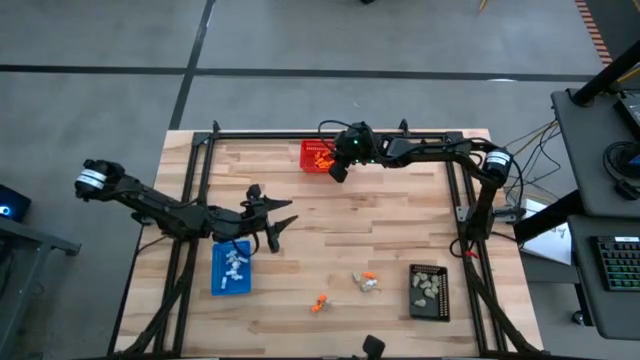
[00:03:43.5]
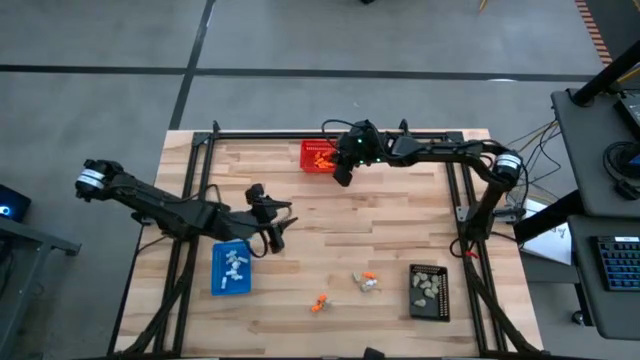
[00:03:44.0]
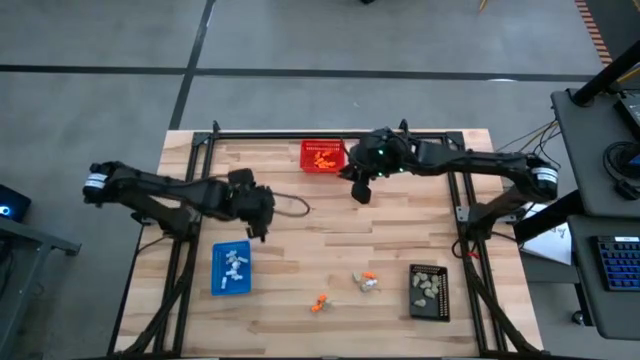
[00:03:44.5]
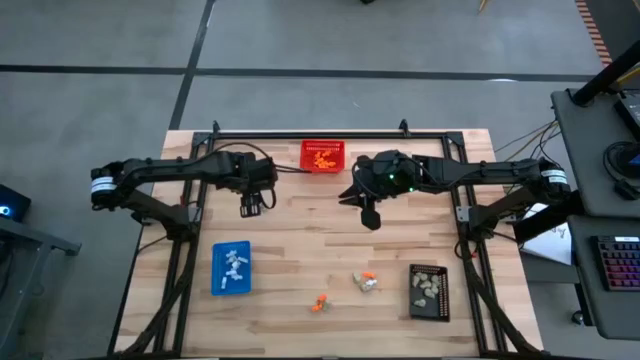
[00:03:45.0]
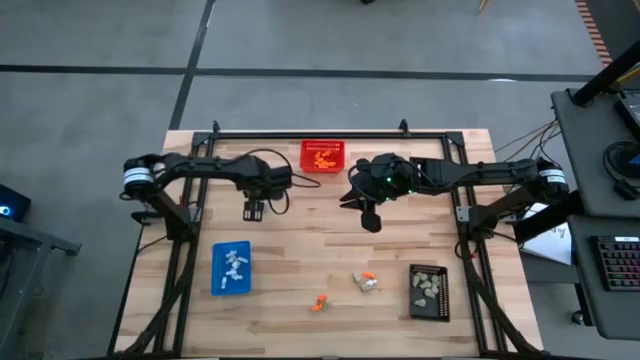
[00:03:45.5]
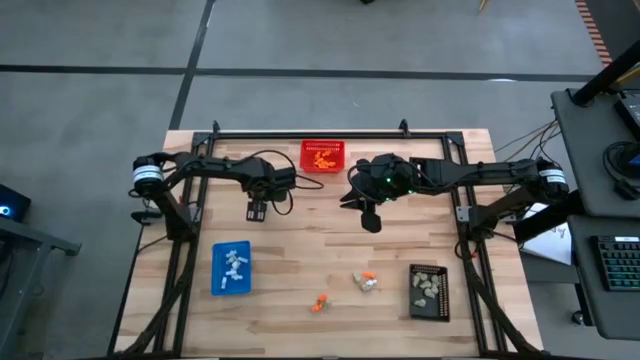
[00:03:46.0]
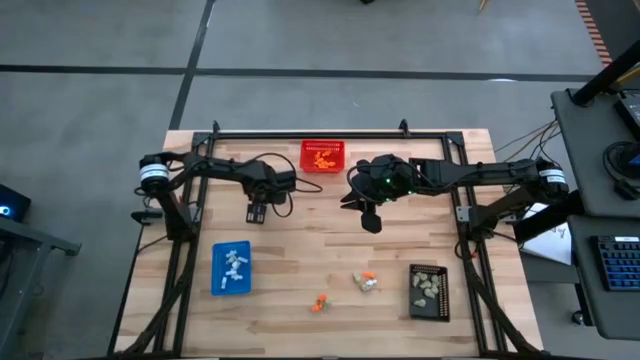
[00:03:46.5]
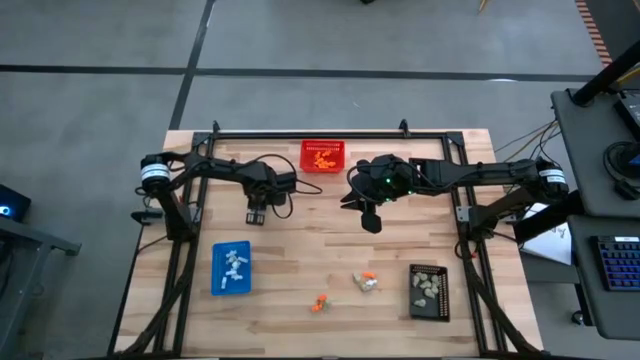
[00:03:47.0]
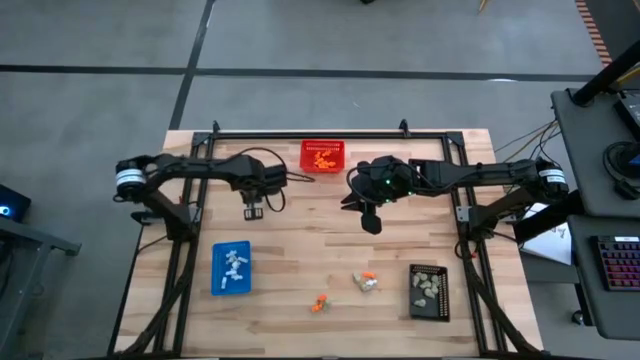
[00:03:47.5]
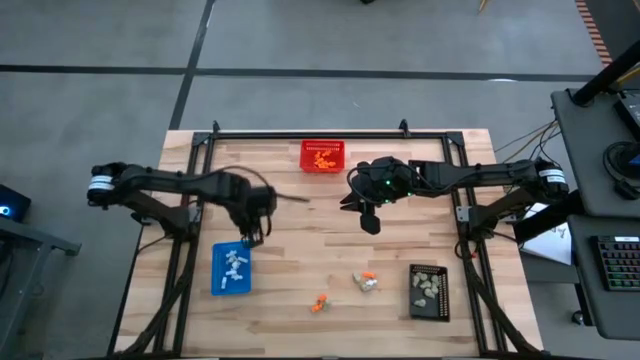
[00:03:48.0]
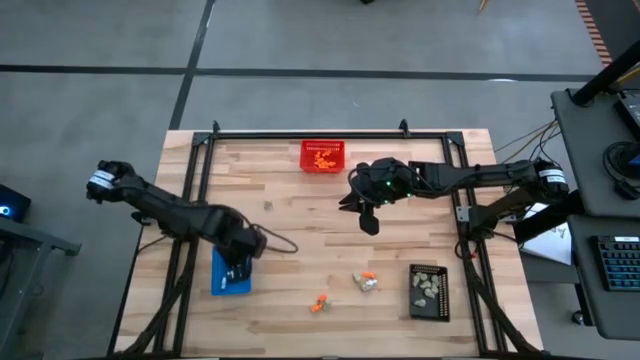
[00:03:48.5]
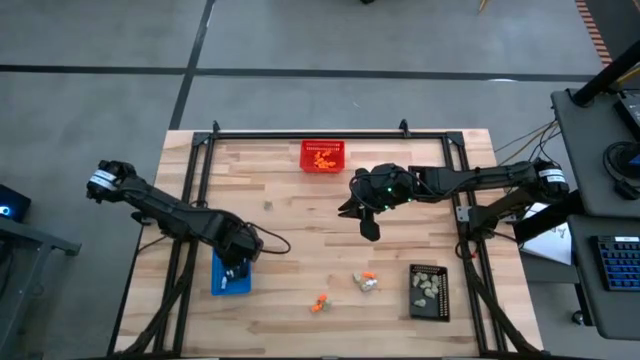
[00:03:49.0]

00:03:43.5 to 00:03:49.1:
Task: Sort Halloween decoration
Put the white skeleton toy into the blue bin

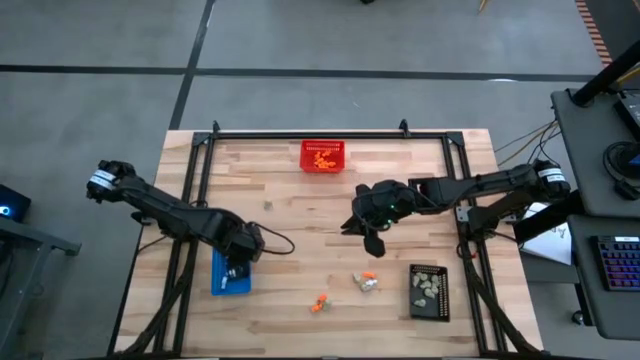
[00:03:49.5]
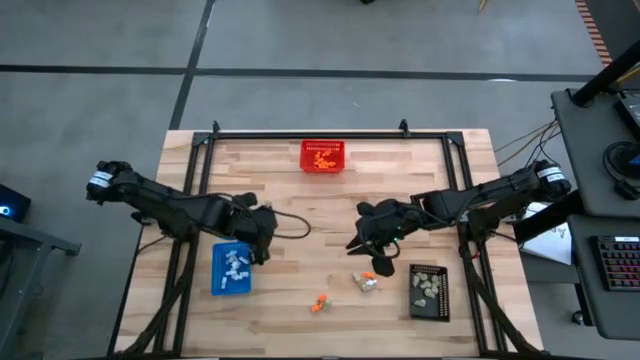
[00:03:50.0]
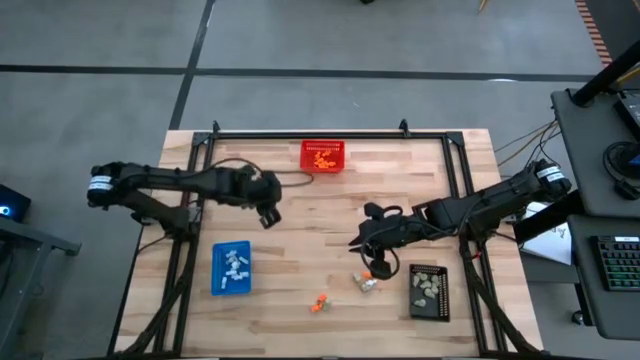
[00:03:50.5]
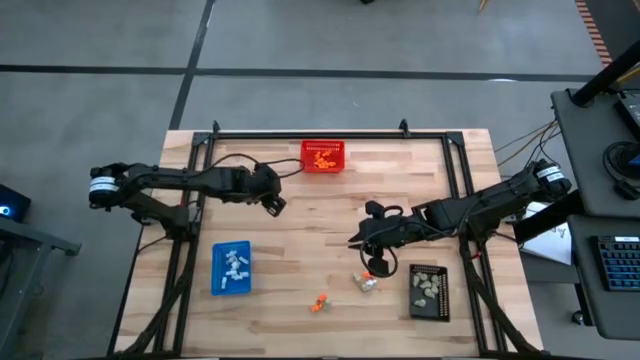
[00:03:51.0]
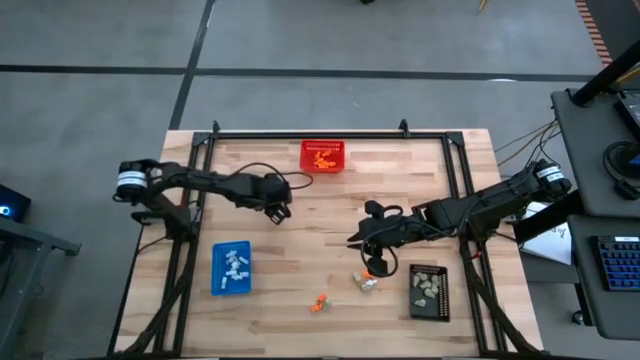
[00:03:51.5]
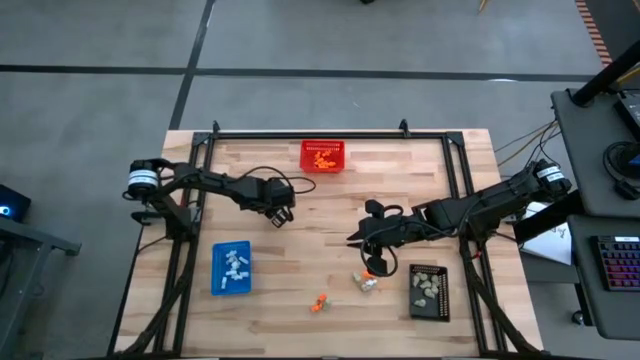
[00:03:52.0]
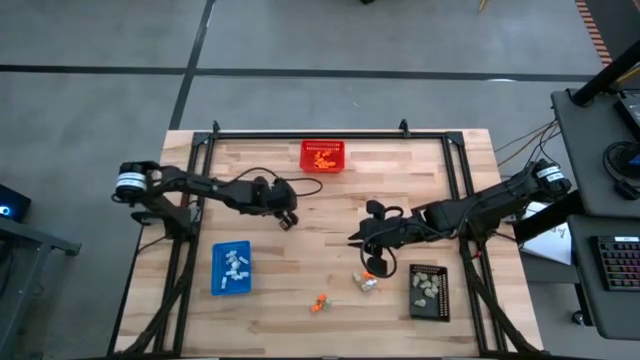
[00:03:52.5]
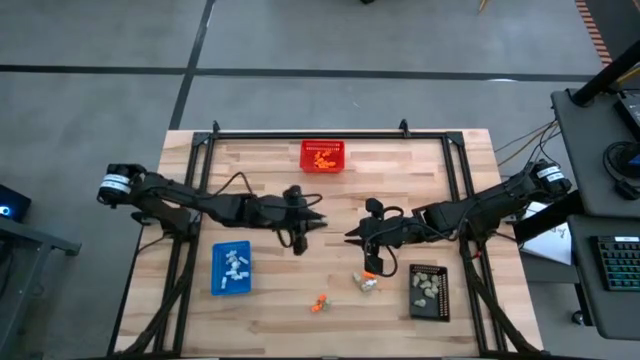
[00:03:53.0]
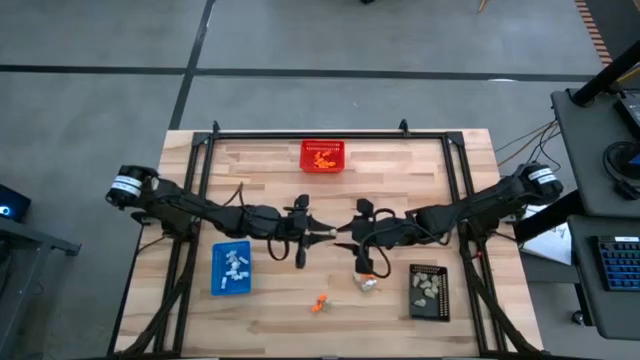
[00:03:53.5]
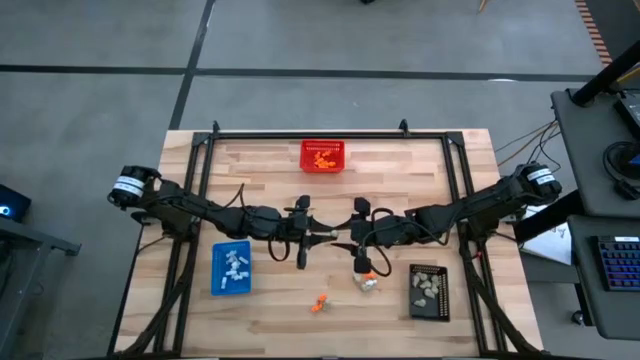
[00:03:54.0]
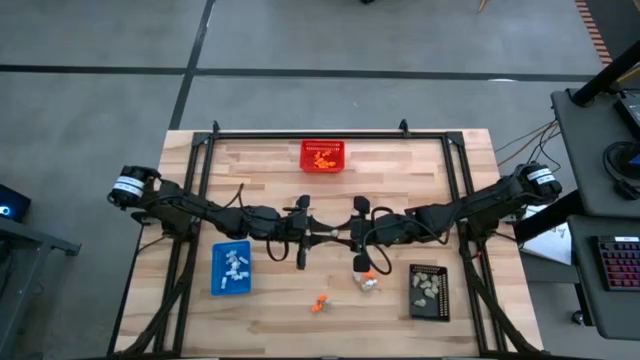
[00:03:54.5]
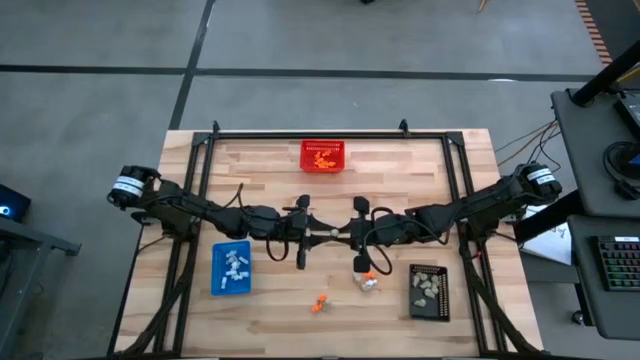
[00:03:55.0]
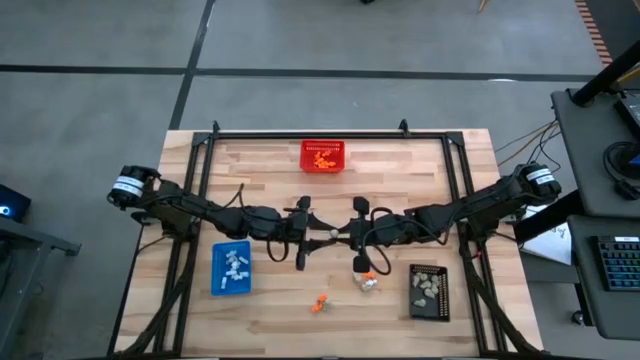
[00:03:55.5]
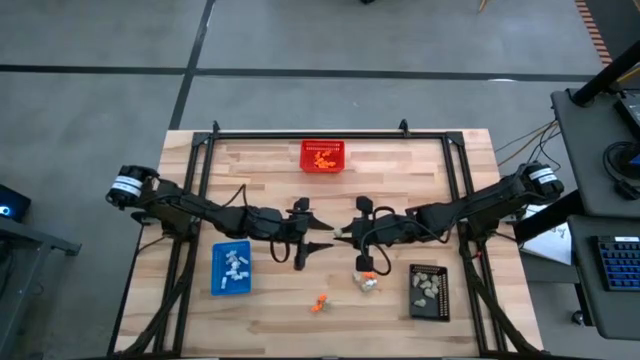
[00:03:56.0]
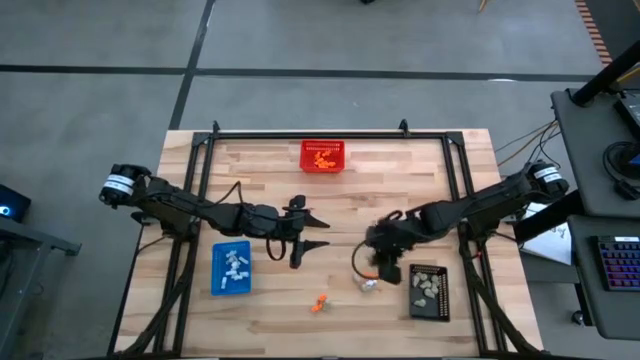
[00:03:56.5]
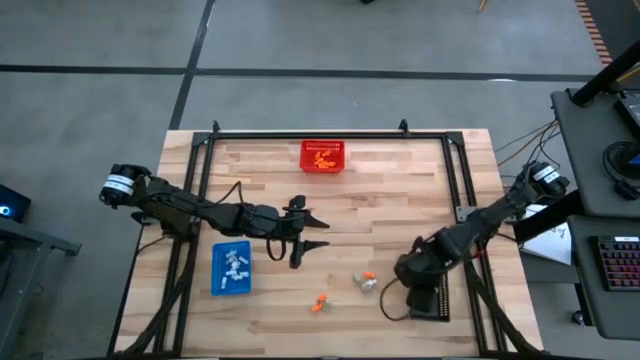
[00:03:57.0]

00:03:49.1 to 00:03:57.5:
Put the gray skull toy into the black bin

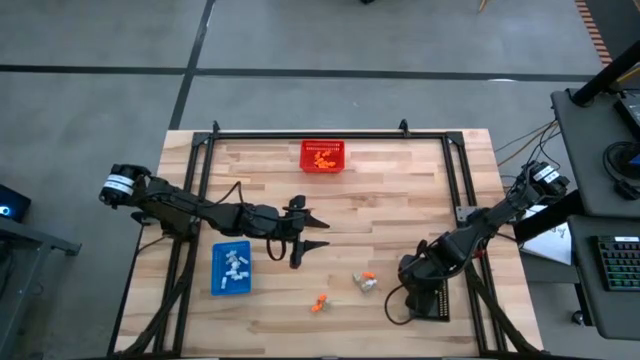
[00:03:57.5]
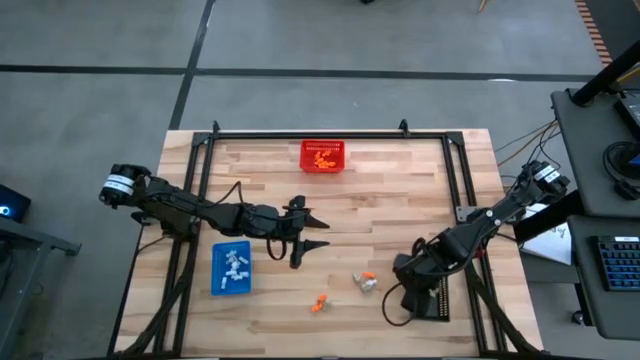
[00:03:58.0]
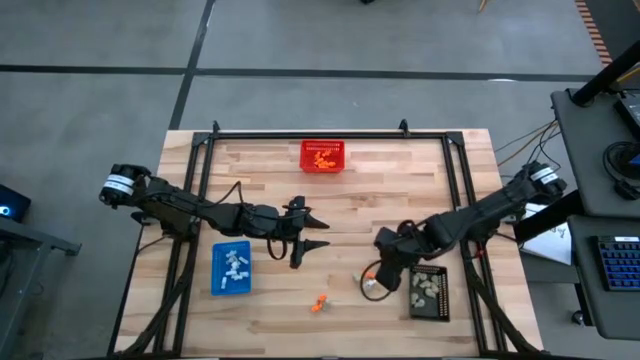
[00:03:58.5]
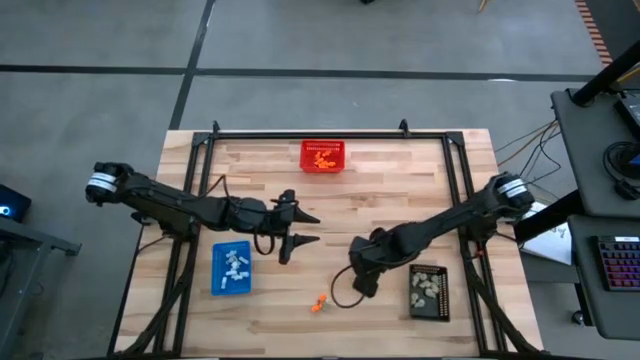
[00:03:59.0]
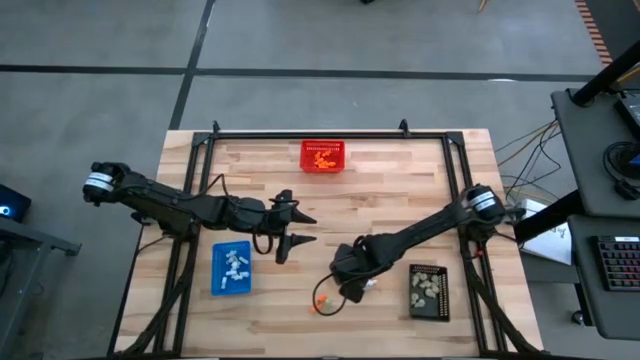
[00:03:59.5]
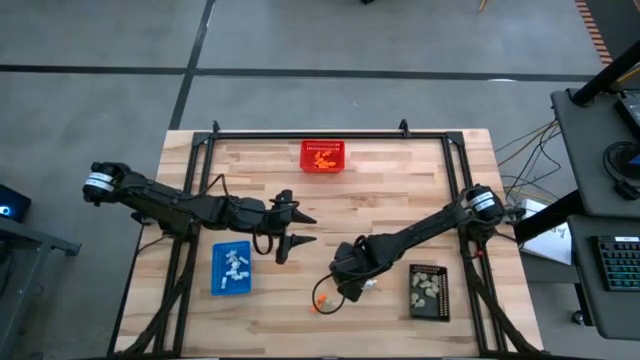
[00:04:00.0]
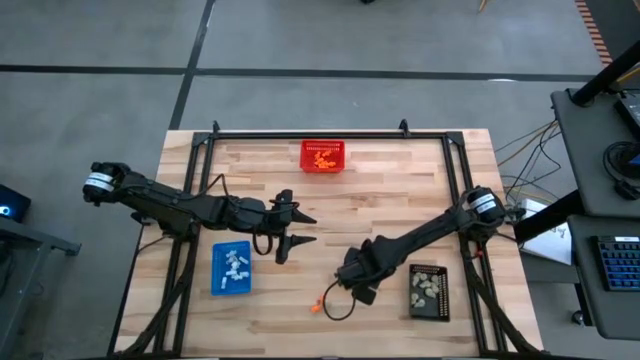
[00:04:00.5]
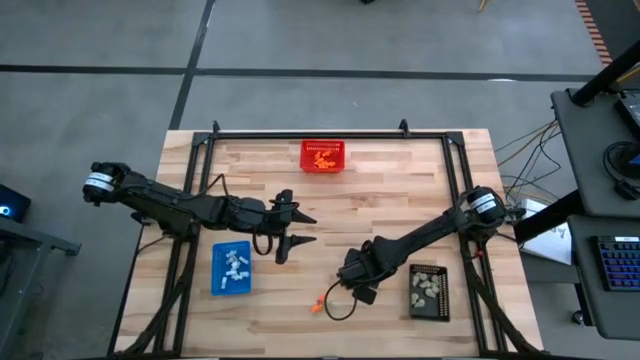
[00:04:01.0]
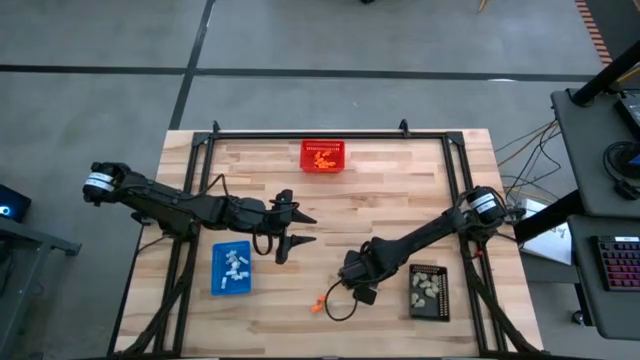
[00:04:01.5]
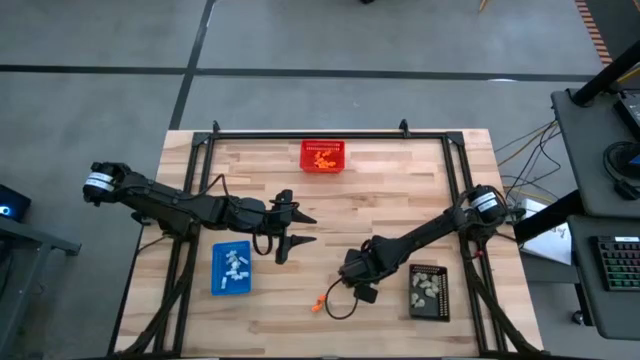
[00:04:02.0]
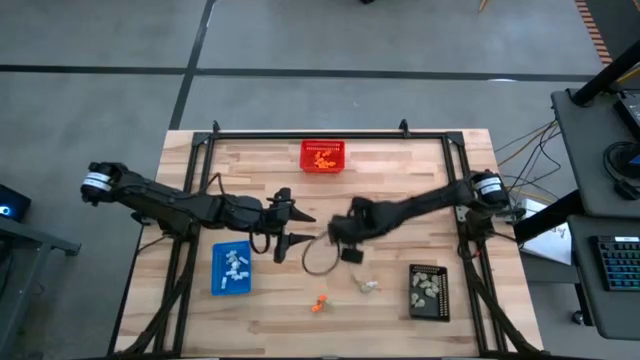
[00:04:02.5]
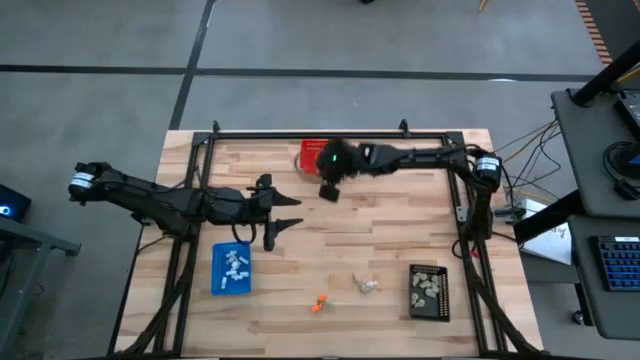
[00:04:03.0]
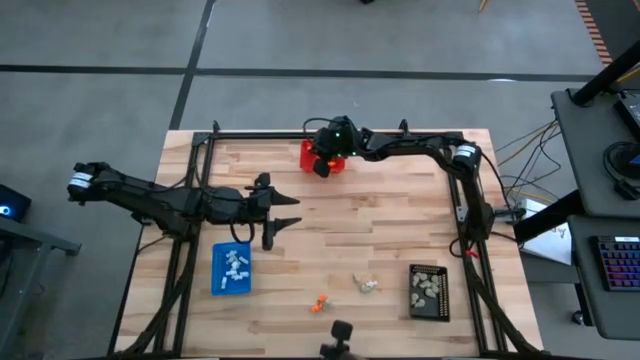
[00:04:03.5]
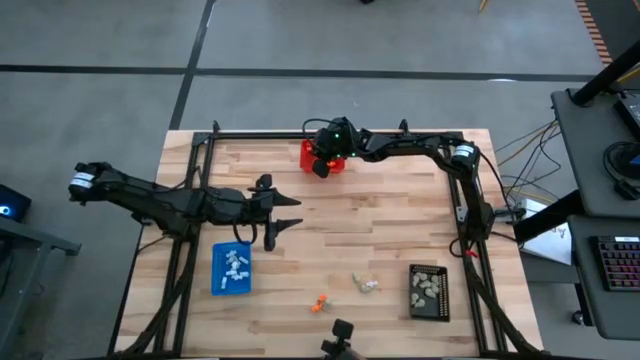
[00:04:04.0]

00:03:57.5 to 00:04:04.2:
Put the orange skeleton toy into the red bin
